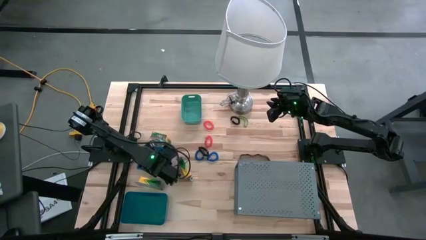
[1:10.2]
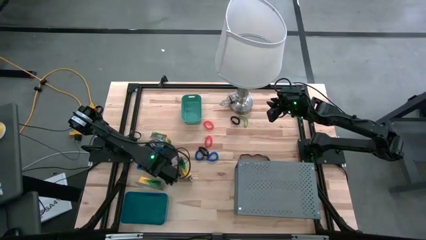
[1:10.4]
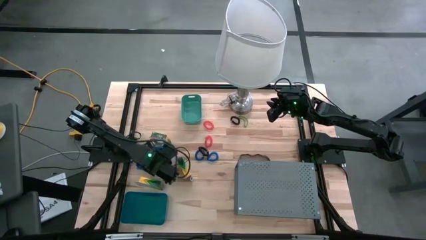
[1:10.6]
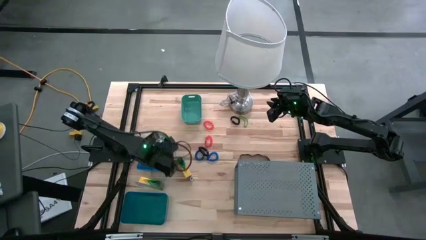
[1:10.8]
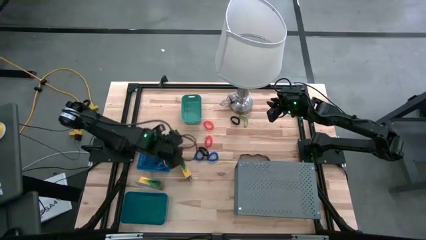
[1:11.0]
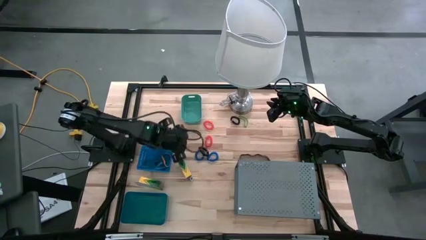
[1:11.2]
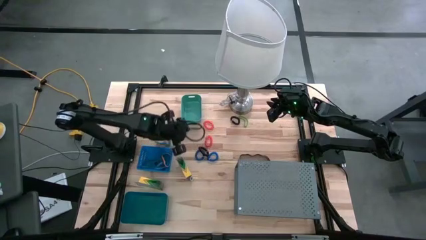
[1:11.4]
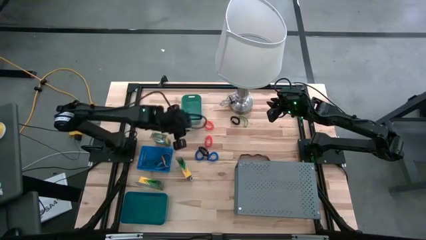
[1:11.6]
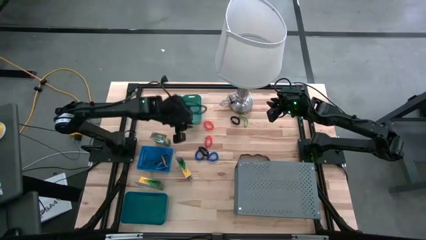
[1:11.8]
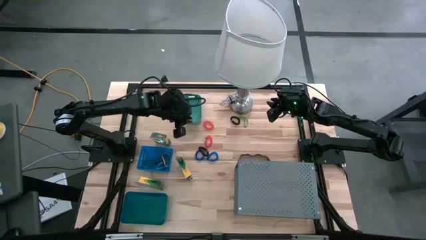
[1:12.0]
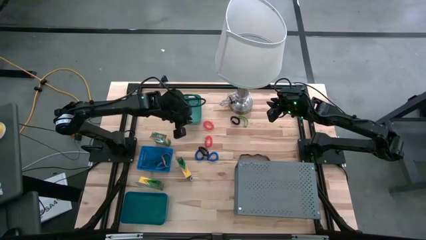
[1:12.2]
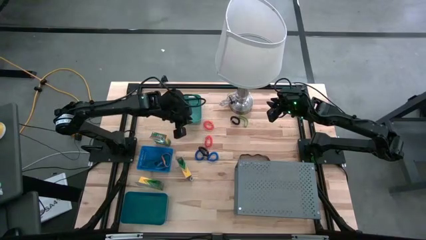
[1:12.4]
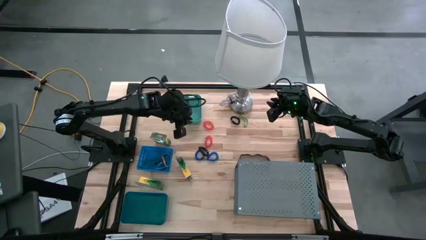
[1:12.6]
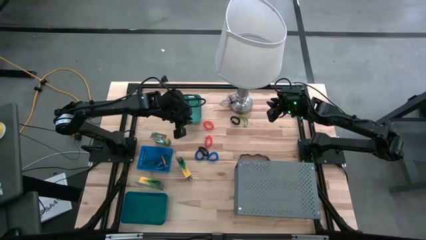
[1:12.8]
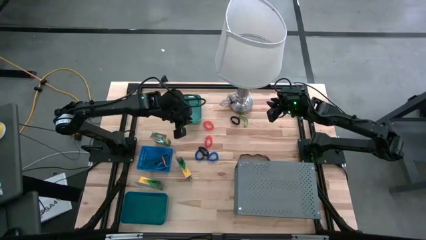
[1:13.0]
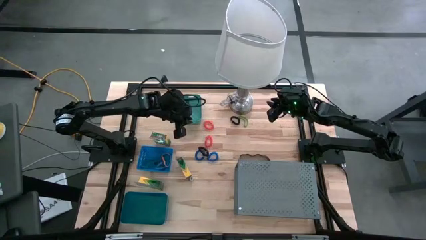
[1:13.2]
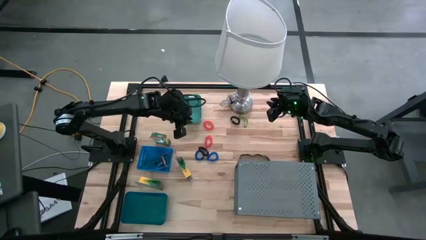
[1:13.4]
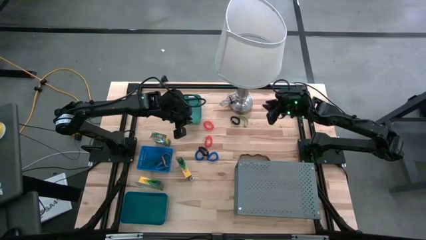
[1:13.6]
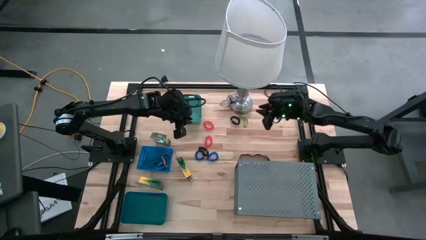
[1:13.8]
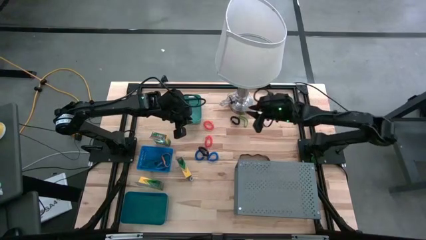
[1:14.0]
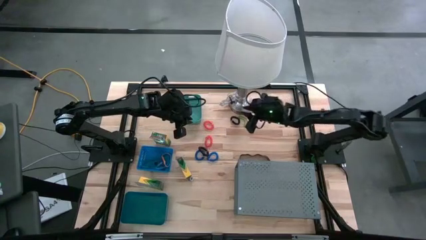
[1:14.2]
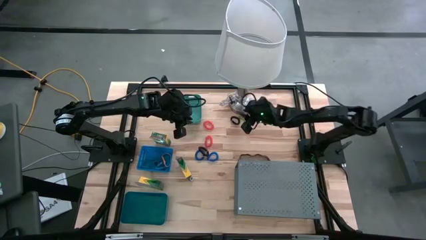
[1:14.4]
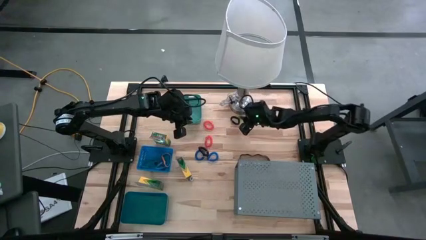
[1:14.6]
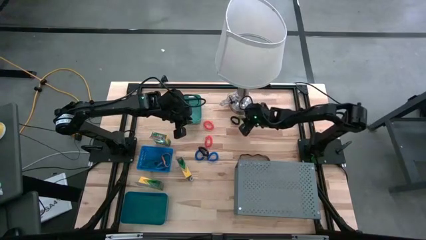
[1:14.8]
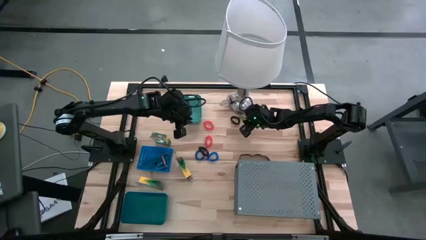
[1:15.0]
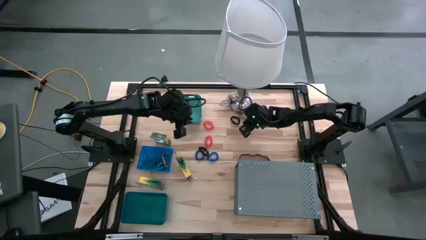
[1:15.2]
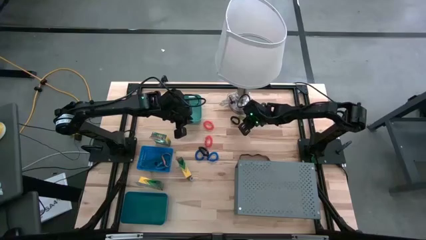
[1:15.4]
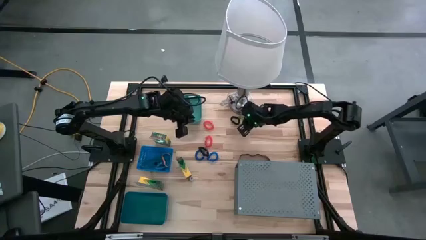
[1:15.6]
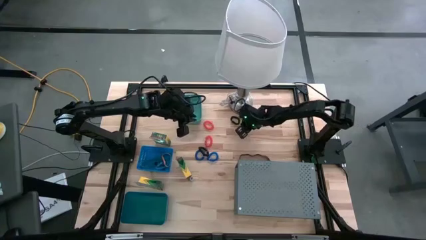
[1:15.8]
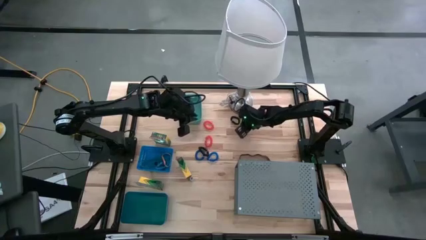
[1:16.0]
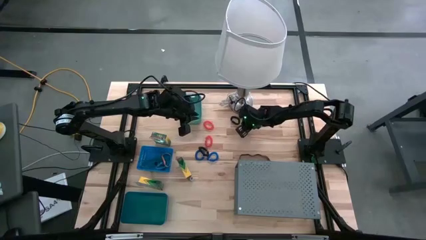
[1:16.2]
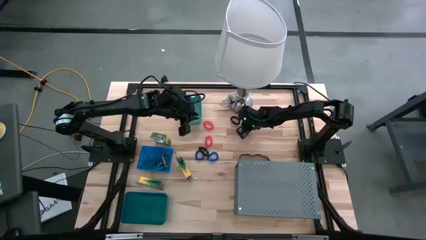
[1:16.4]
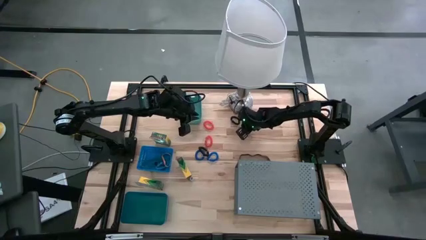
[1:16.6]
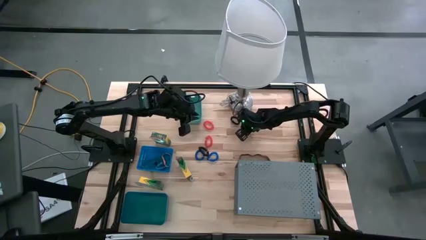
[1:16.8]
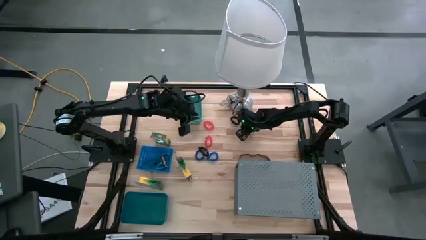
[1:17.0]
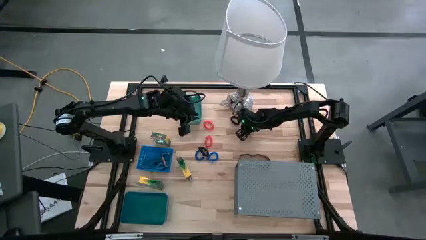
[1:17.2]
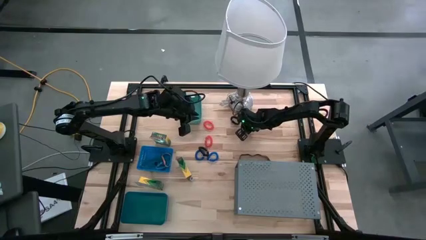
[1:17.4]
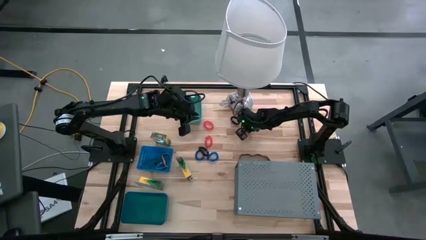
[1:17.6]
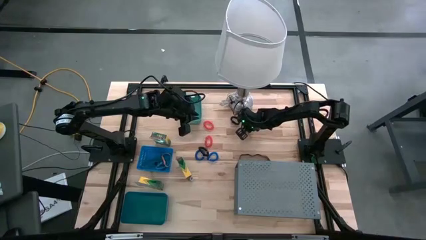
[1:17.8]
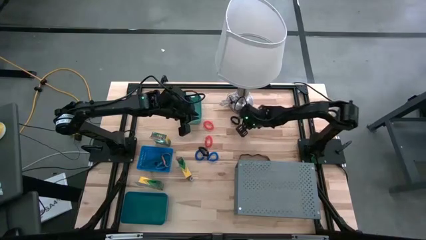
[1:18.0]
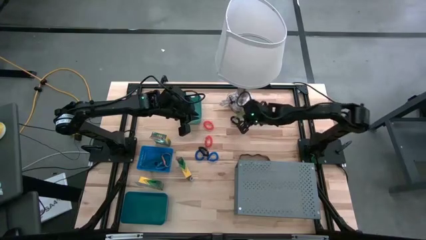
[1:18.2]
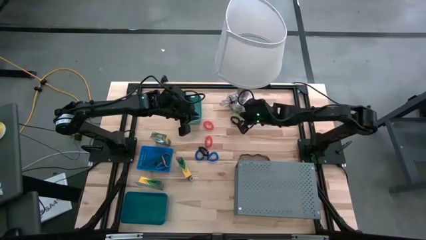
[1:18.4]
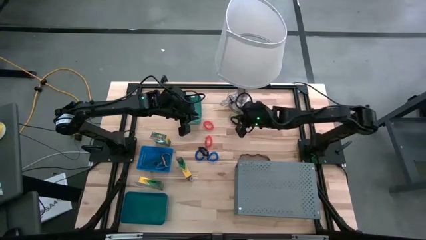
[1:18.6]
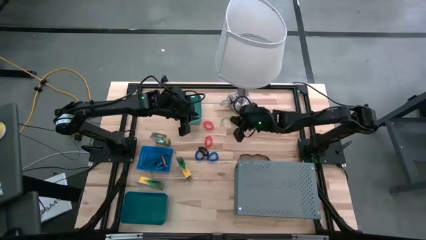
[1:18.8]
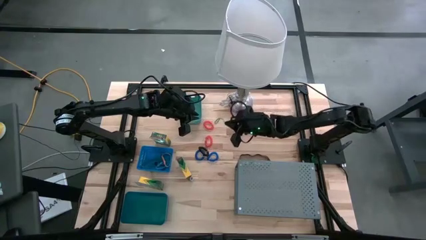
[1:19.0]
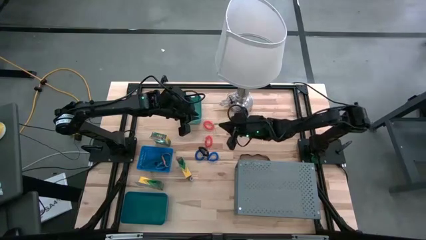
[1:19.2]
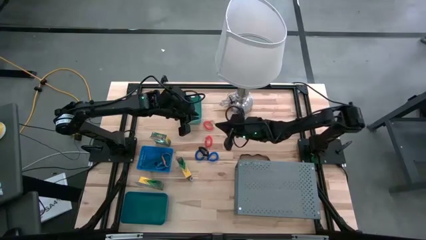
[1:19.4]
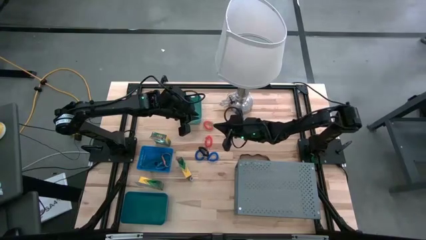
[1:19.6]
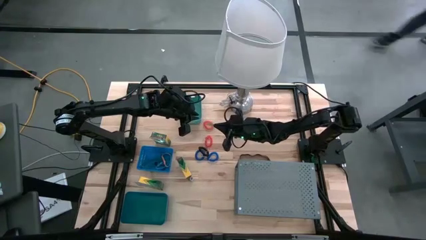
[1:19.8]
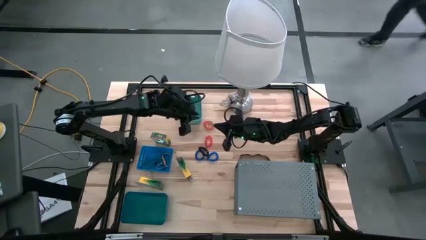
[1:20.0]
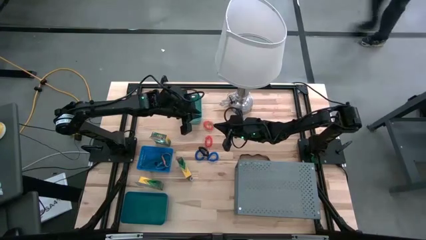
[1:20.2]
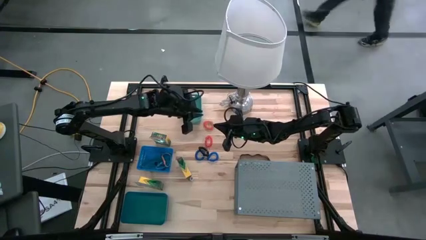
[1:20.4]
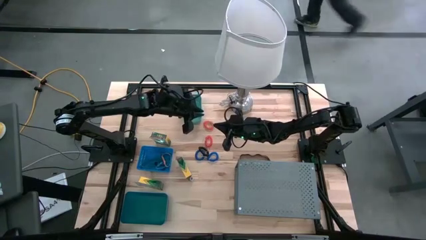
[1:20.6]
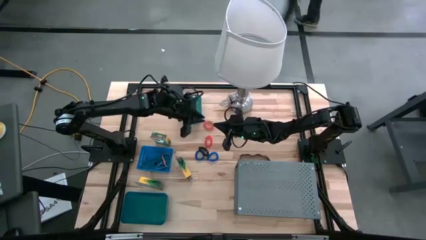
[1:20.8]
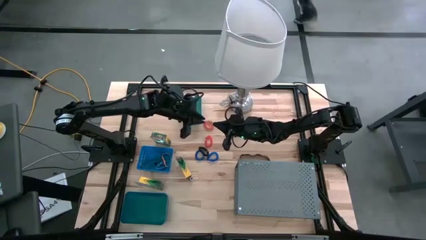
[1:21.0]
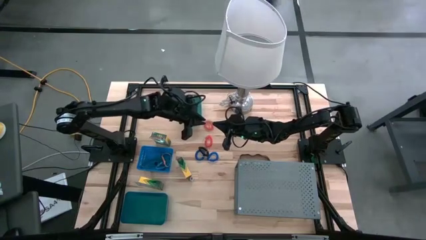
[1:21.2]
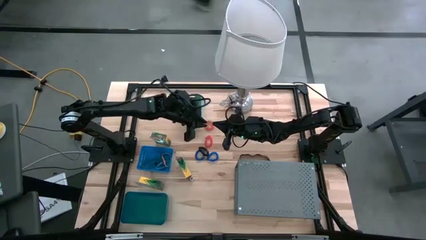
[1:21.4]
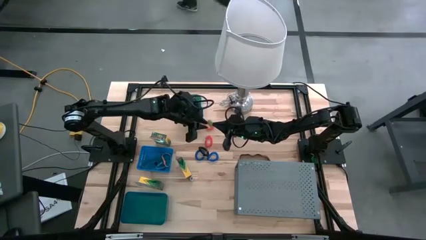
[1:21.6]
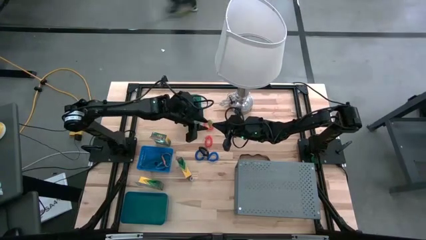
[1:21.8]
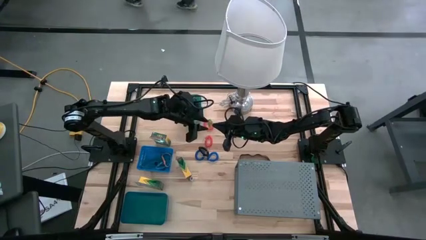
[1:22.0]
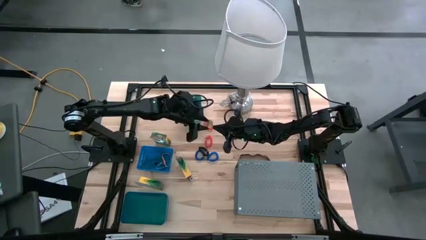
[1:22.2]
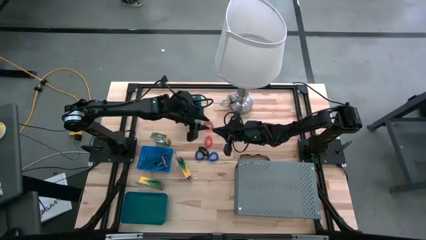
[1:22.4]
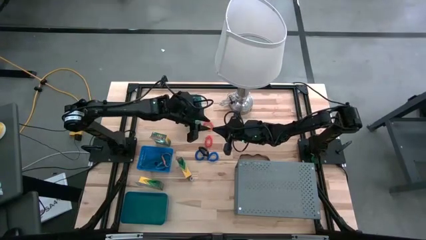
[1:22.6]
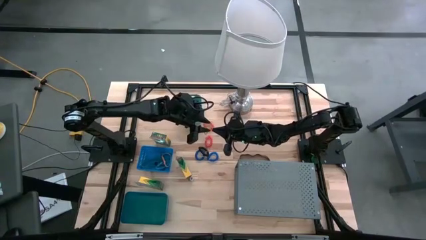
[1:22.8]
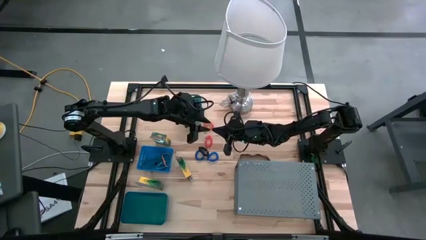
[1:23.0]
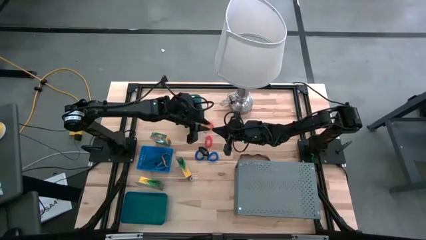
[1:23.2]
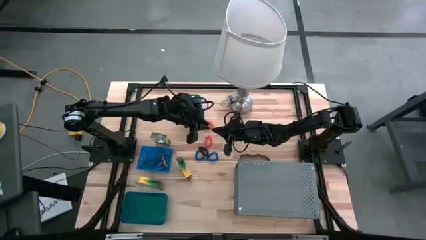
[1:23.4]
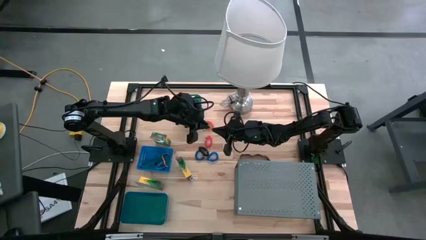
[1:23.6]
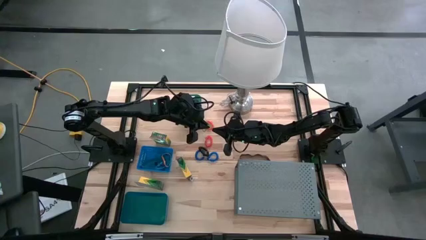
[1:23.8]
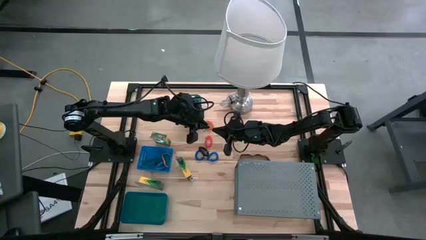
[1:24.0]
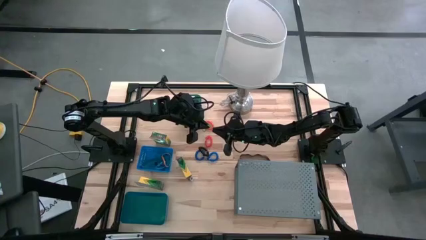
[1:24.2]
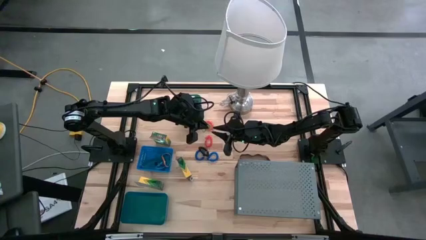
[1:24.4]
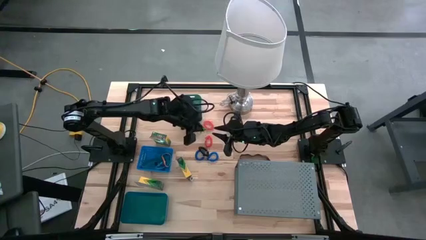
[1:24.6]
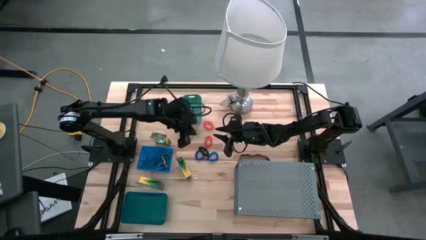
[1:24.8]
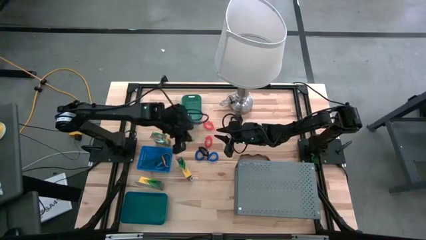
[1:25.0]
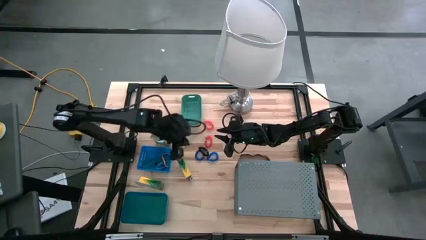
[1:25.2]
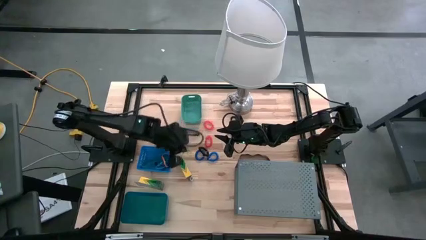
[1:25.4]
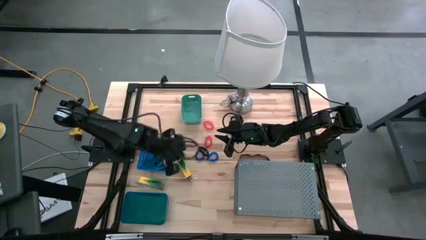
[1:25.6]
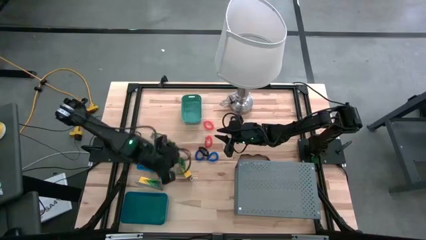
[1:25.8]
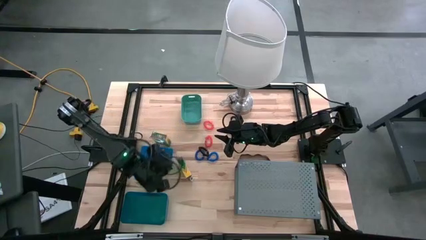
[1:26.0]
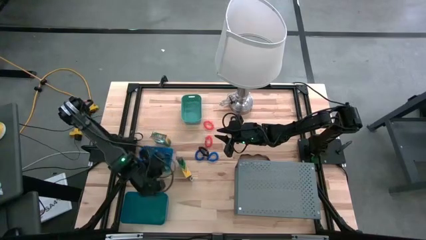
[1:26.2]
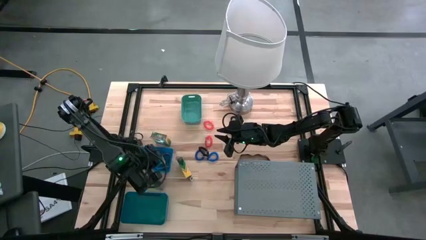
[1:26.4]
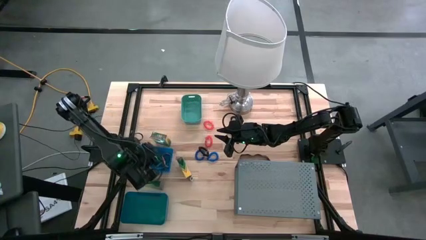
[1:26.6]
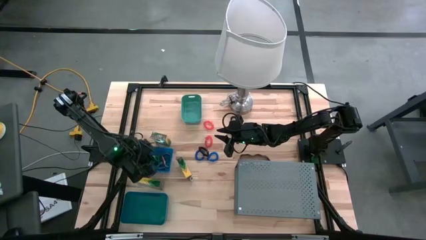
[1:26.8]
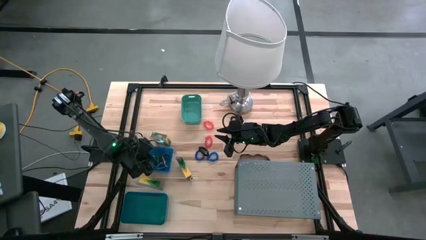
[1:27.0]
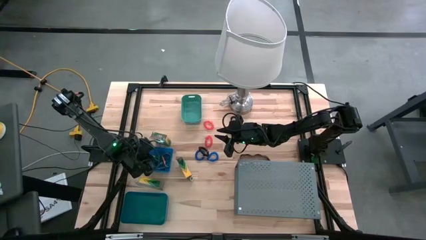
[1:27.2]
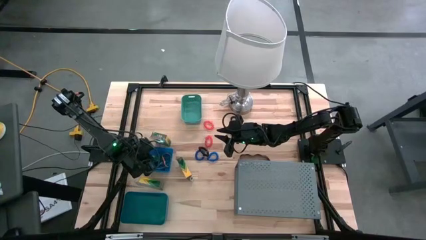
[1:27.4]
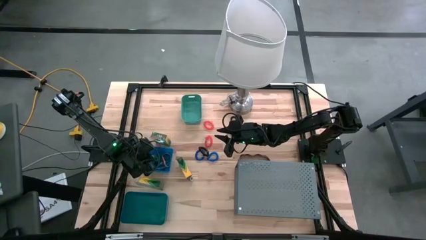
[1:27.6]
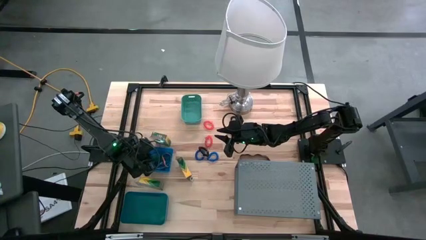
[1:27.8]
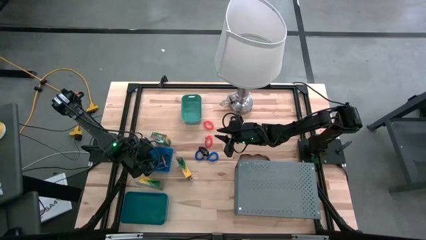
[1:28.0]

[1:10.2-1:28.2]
Task: Pick & Place Office Desk Supplies
Put the green rubber bands into the top blue bin
